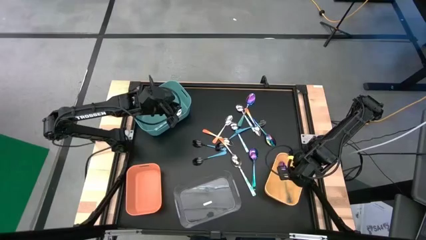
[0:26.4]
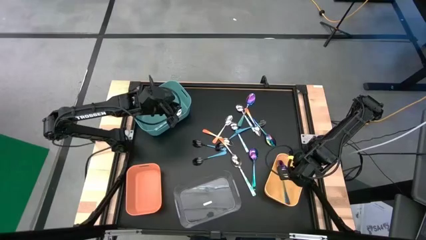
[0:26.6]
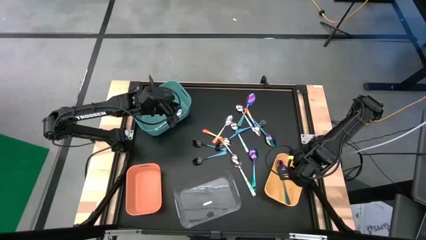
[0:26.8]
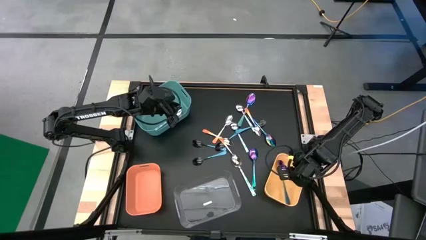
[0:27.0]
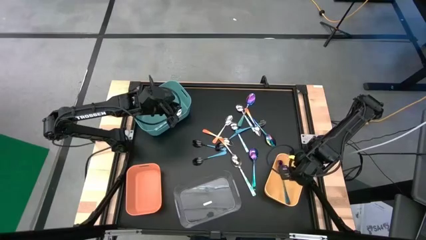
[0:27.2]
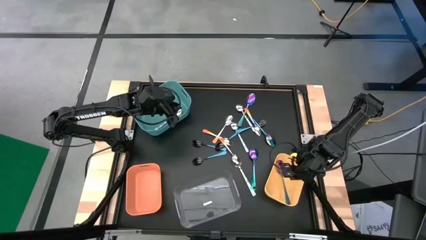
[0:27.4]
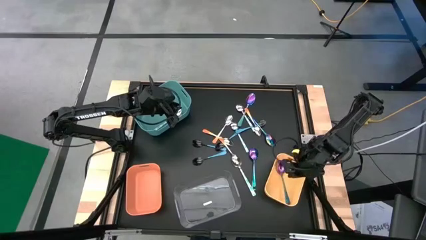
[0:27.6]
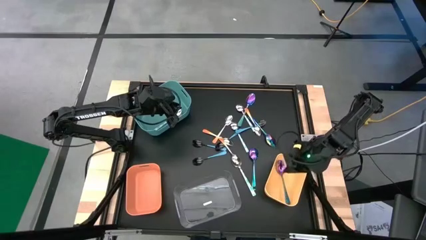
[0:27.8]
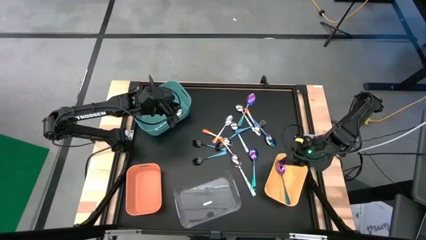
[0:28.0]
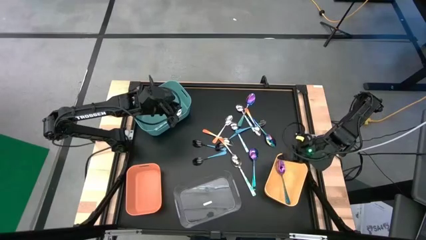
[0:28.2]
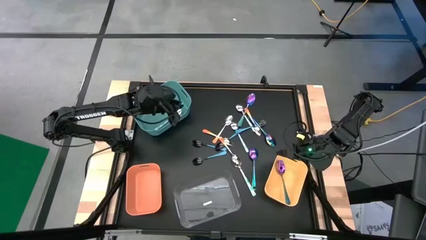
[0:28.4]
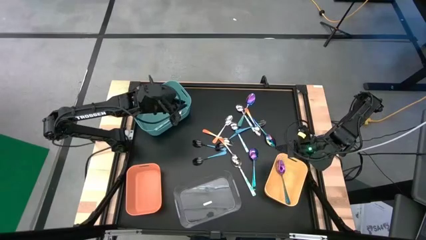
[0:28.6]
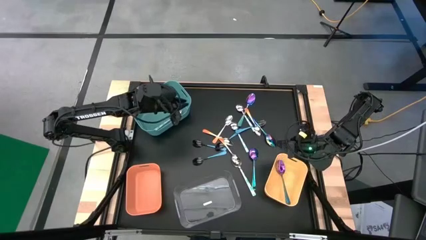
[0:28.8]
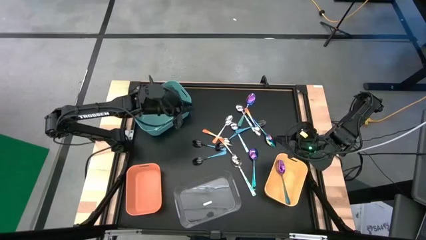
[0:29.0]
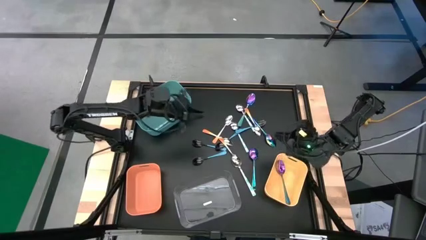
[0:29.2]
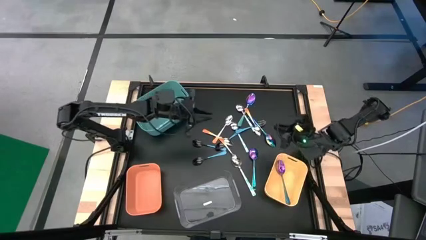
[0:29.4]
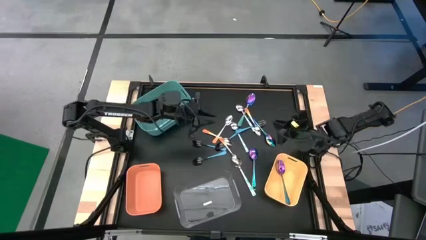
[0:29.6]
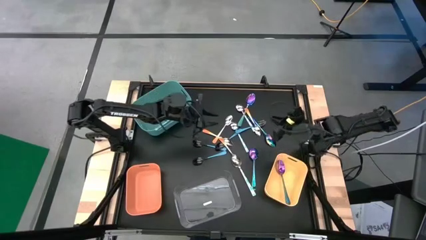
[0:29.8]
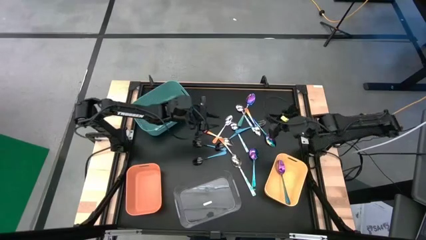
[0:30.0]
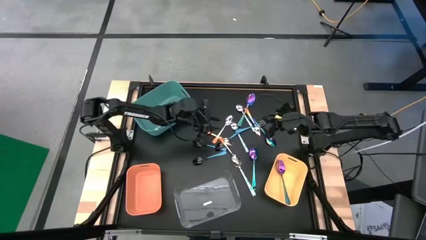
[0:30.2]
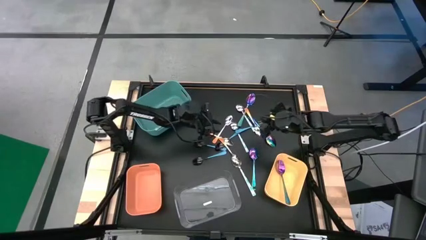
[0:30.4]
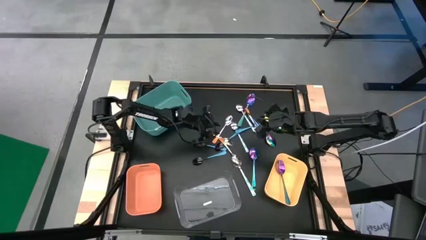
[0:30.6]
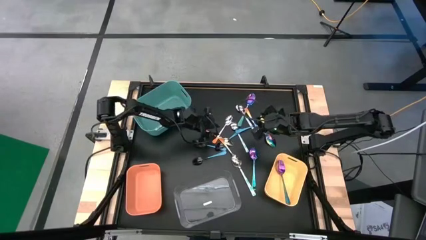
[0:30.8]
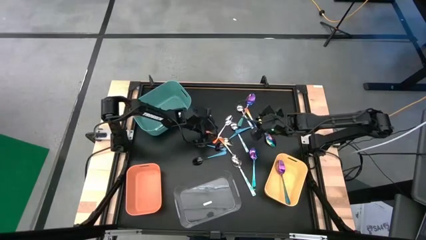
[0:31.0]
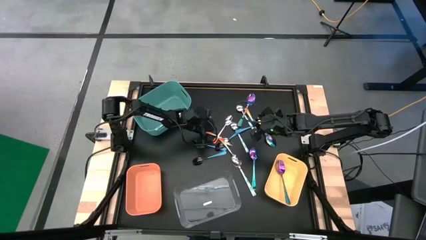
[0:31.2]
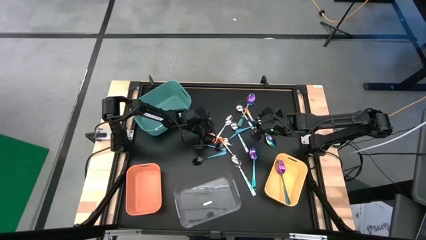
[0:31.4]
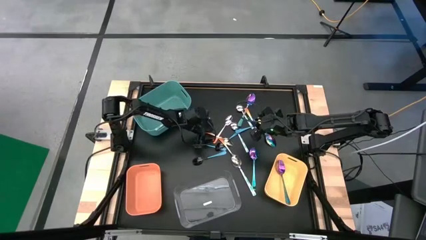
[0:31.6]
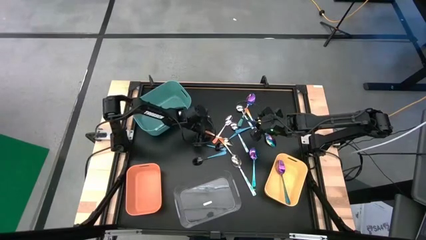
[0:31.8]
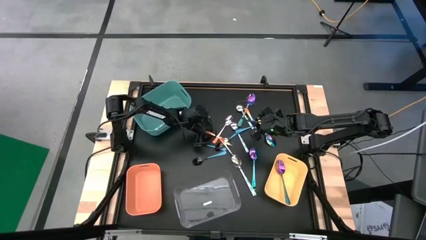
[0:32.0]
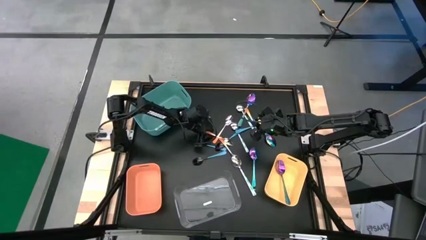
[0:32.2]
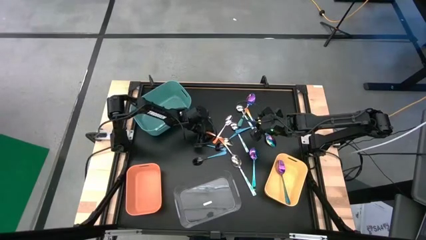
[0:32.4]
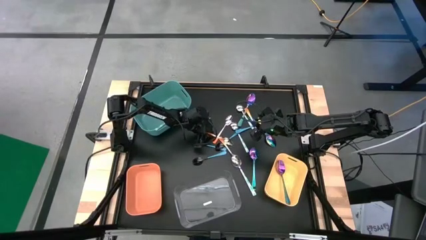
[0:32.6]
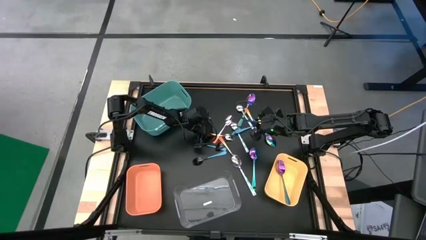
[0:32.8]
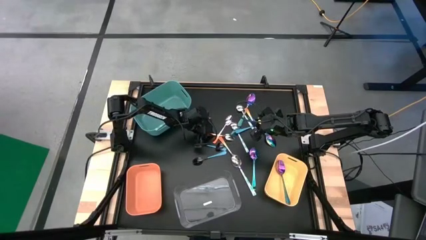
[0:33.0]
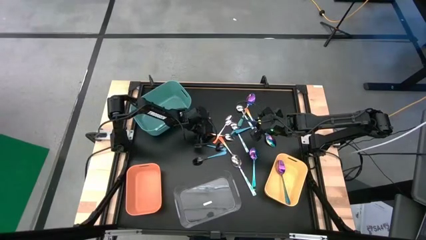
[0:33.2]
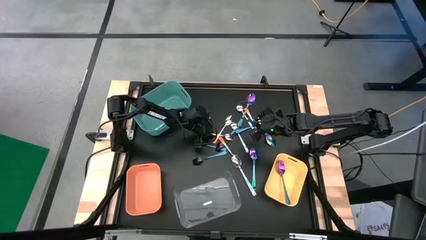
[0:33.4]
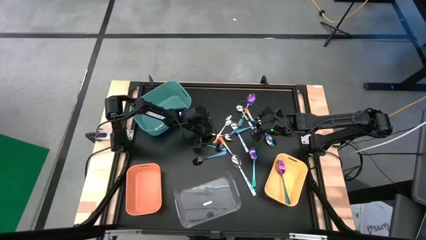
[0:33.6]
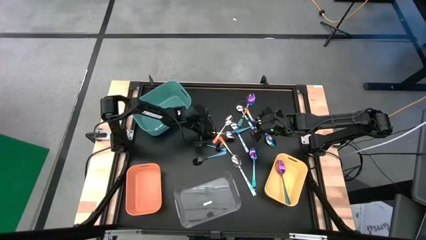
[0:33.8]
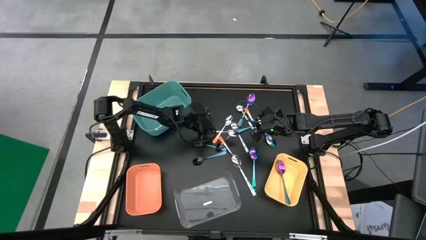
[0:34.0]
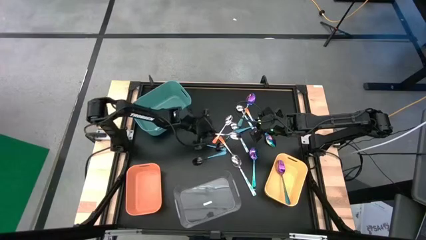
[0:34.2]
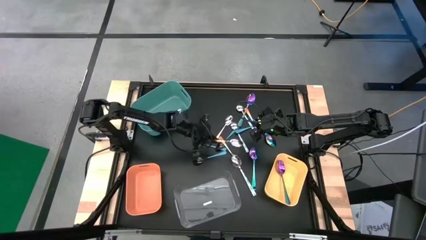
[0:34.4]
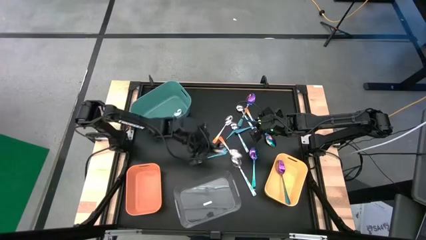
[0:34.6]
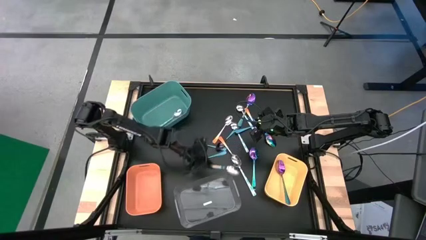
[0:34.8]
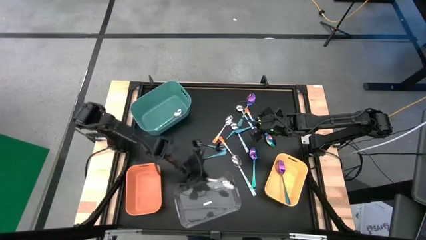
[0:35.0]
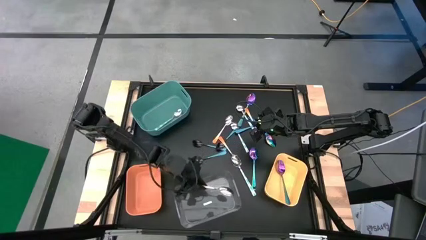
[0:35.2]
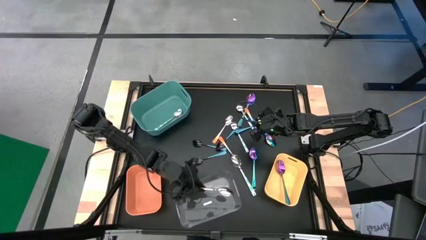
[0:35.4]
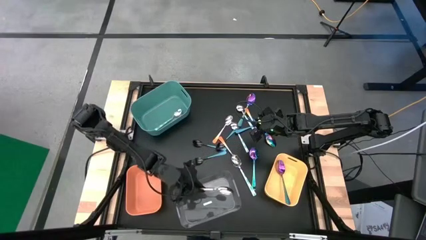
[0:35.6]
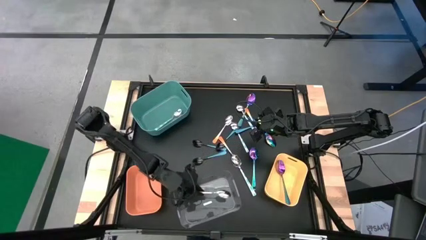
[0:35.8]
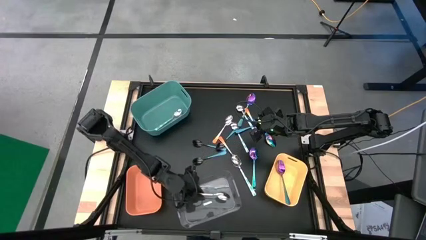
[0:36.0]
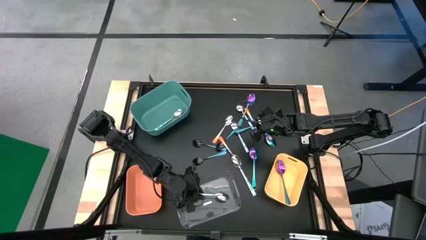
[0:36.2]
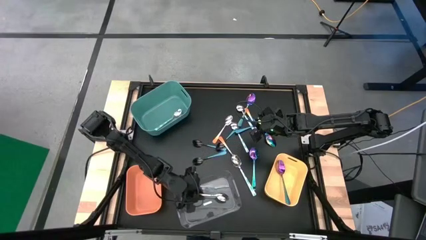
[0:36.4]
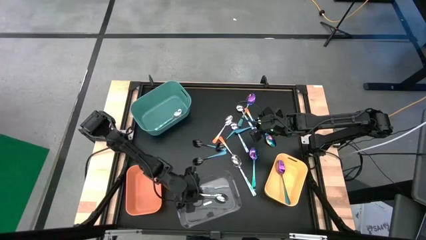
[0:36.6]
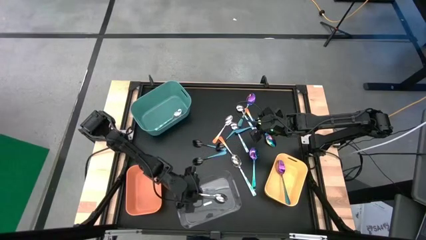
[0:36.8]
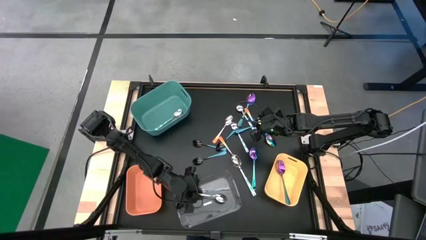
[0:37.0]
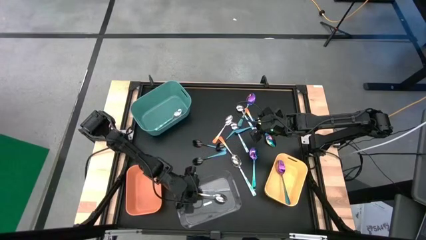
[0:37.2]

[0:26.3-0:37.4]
Task: Sort silverware by color (type)
Put the orange spoon into the transparent bin

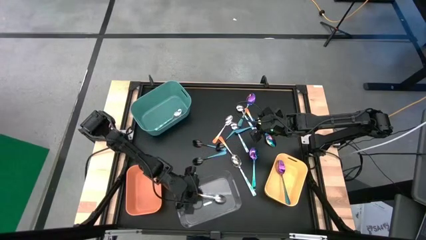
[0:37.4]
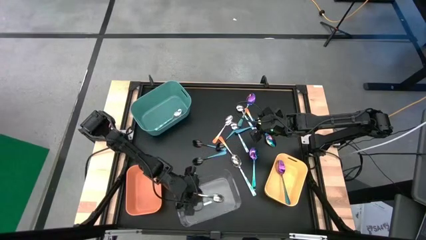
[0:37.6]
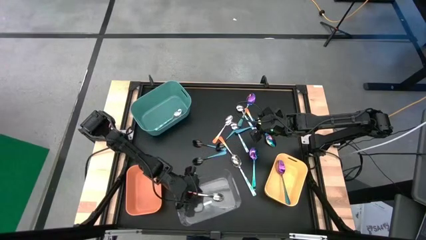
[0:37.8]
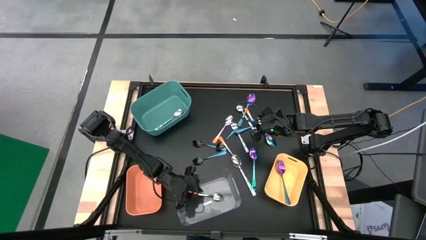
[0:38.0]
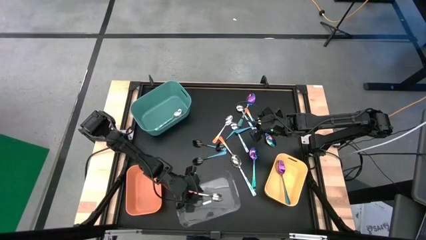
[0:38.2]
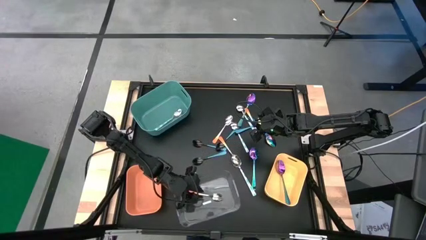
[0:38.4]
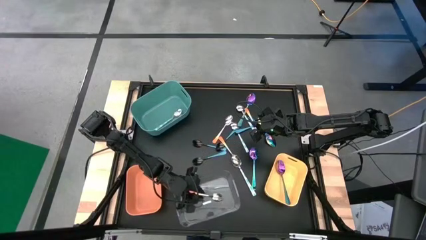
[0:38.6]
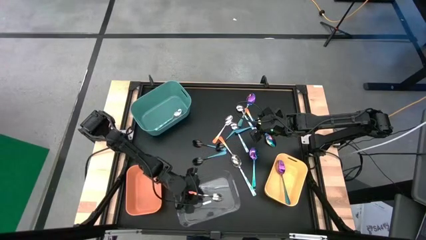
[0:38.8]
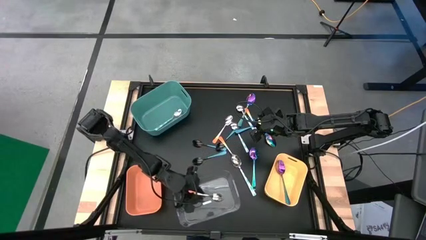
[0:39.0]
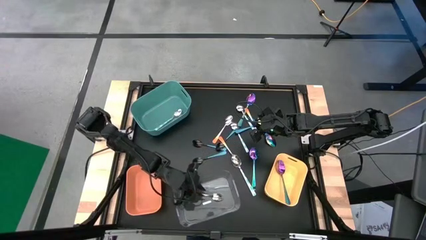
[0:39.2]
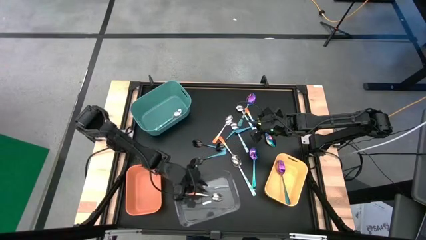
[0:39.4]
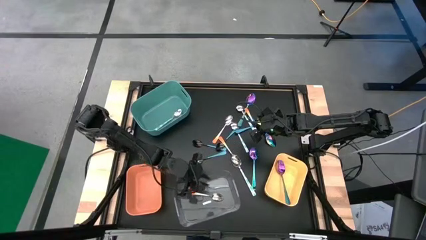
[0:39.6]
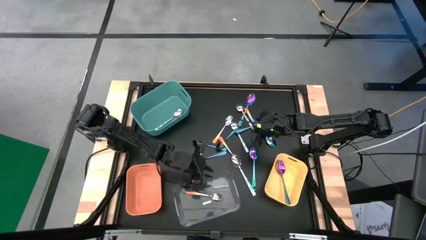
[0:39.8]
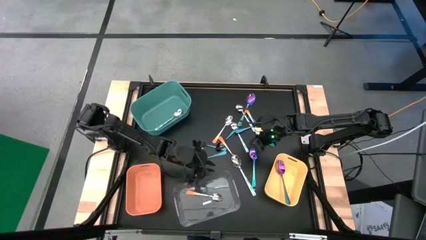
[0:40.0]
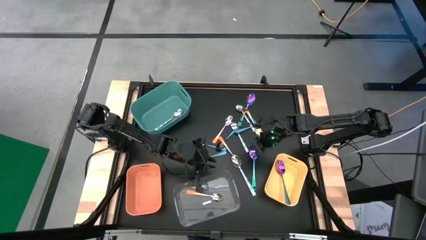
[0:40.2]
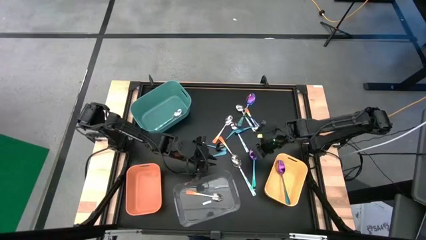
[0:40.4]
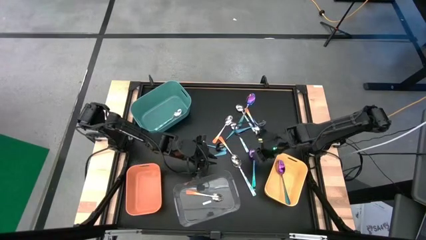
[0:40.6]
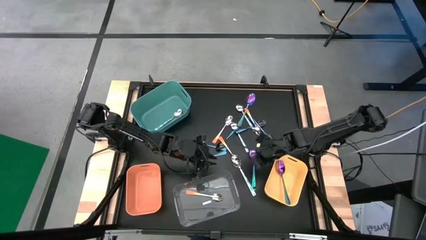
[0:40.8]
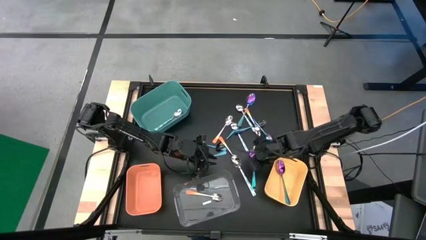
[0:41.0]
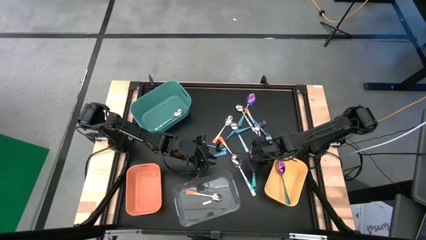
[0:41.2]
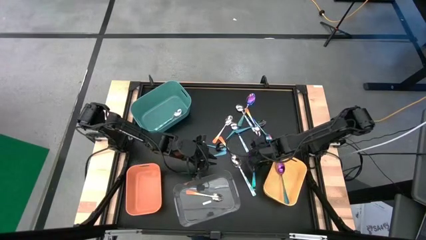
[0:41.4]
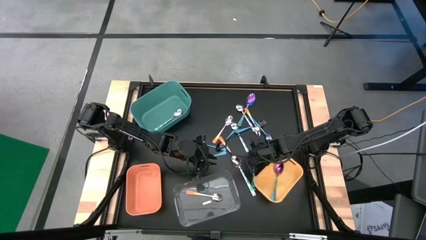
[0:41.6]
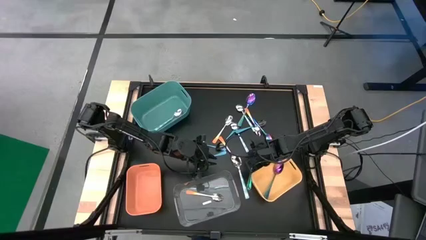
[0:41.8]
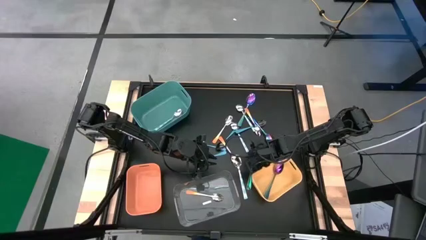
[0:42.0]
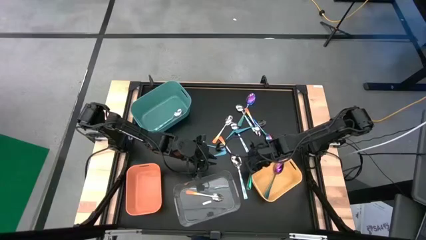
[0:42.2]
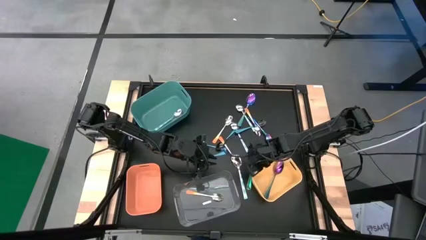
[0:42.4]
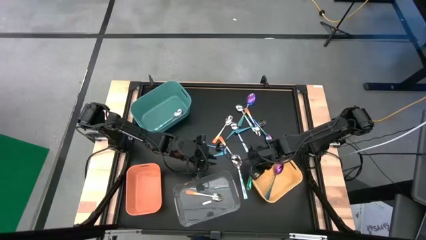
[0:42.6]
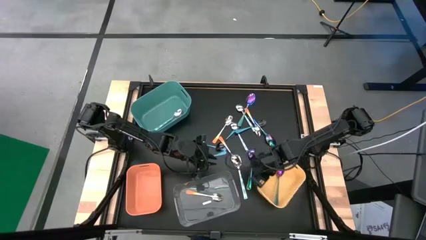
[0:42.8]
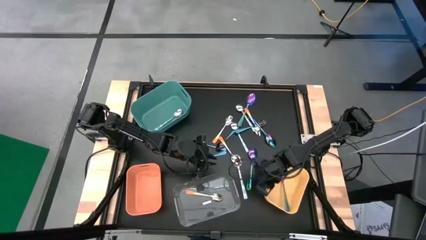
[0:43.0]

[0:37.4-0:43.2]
Adjust the yellow bin

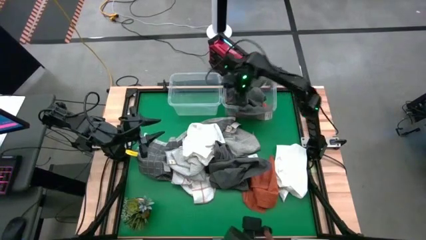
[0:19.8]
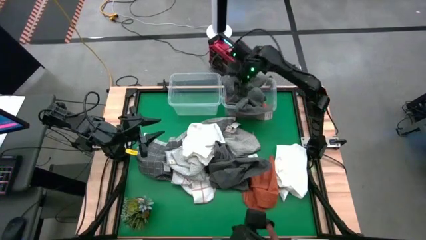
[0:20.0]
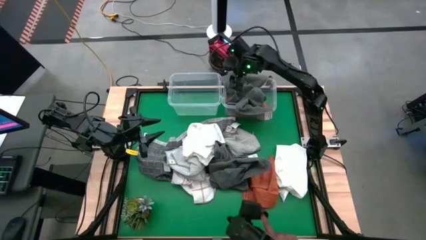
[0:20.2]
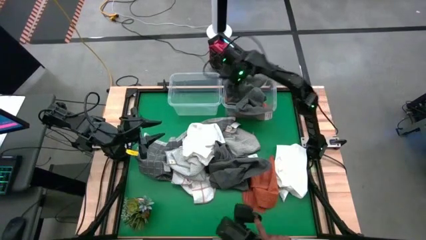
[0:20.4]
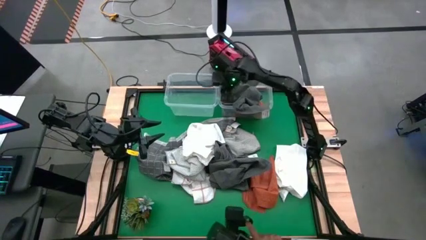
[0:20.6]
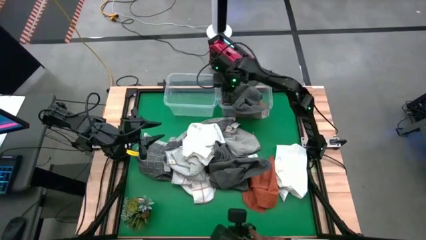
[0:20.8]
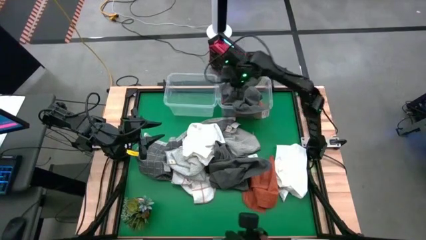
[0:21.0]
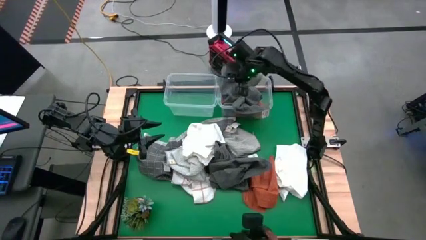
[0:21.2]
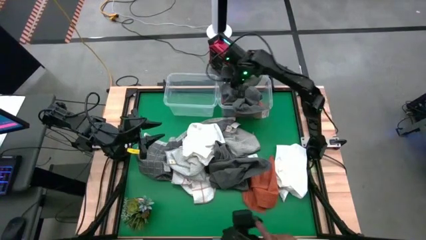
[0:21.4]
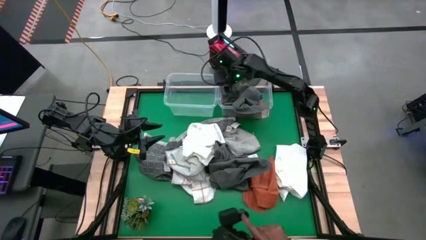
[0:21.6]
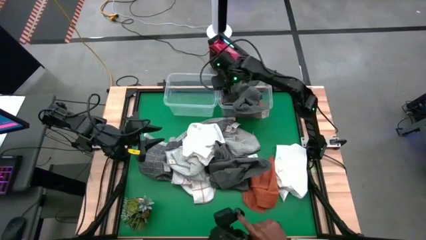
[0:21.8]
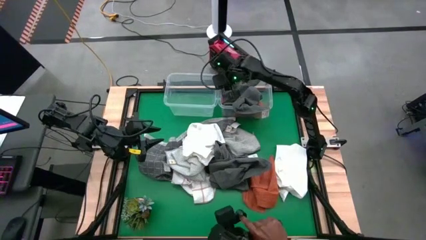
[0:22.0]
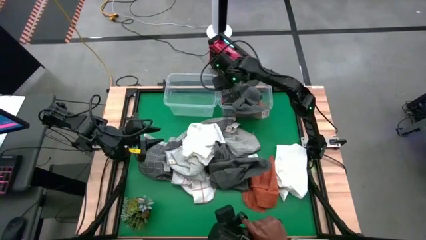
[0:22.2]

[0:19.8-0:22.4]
Task: Sort towels by color in basket
Put the black towel into the right transparent bin
